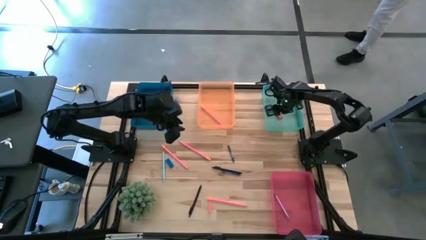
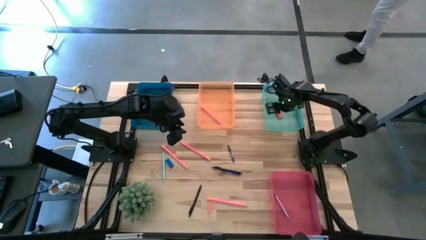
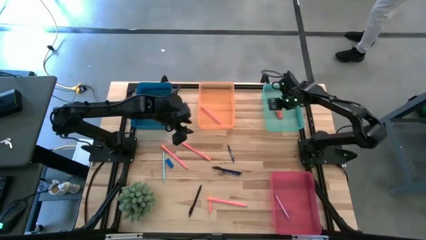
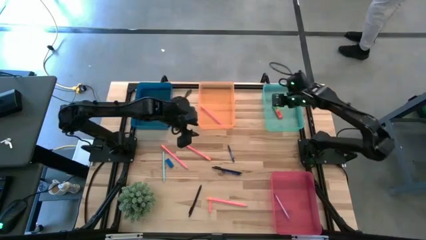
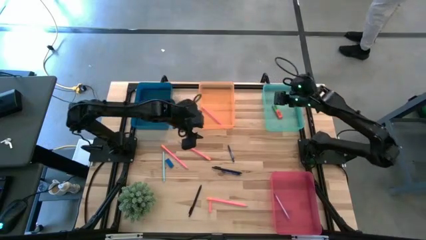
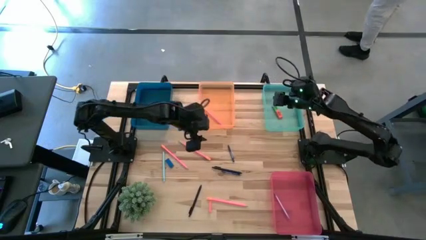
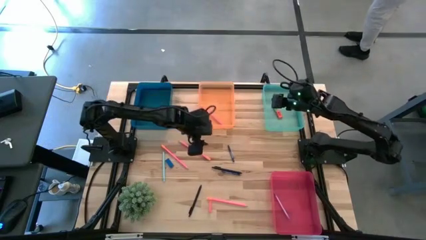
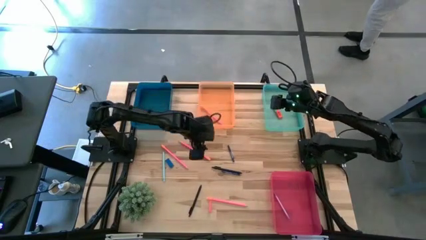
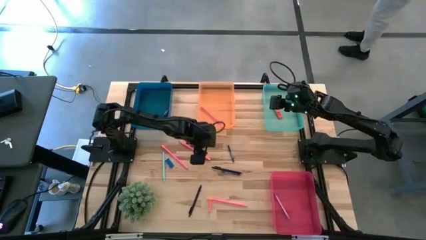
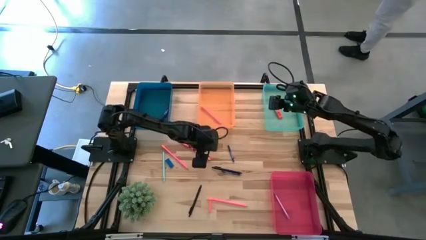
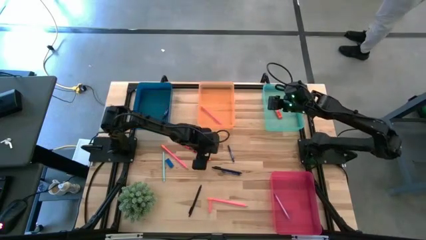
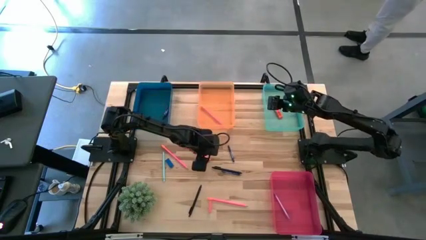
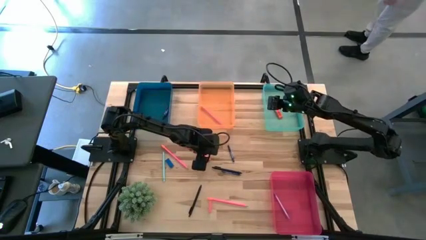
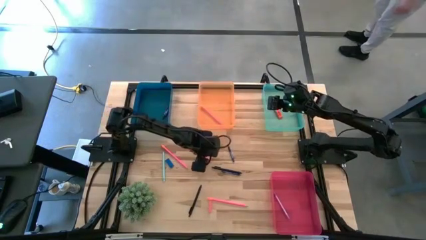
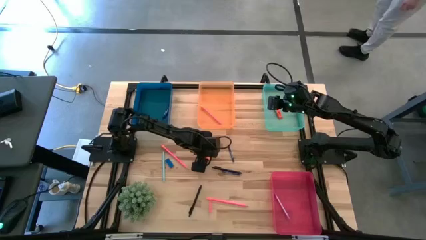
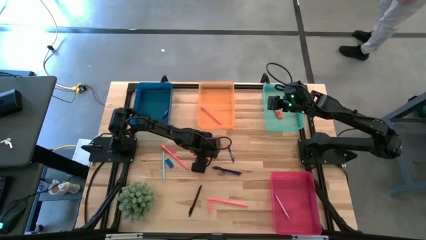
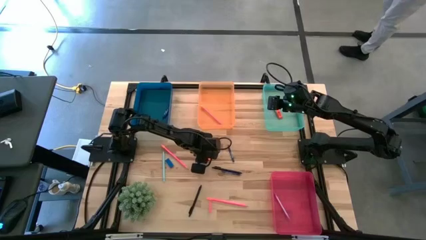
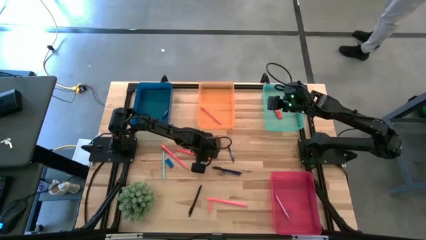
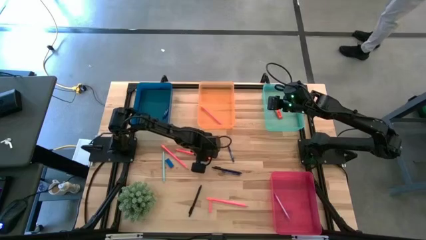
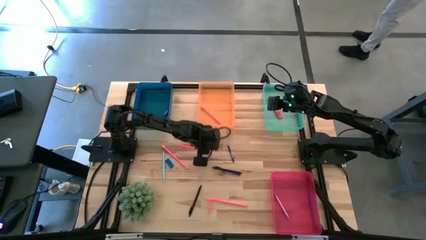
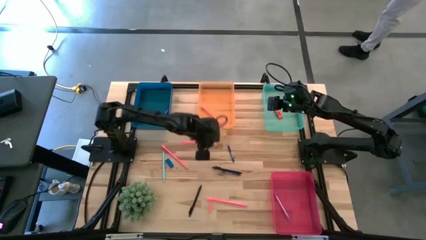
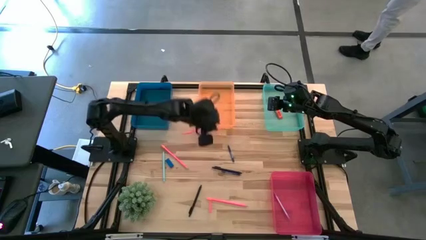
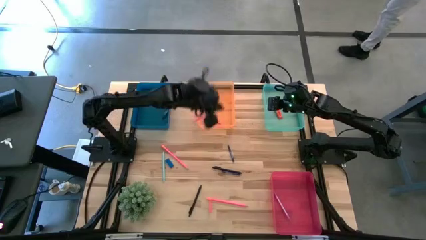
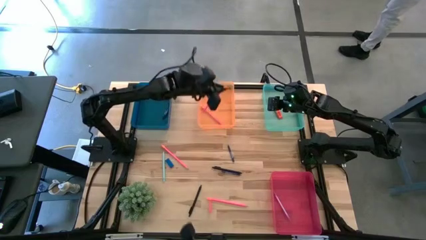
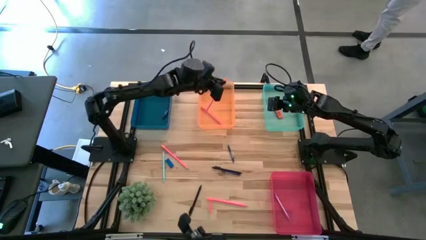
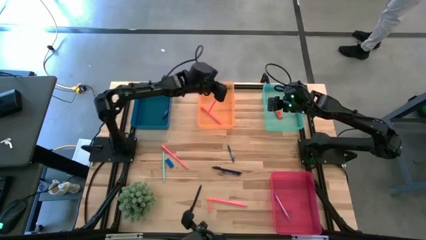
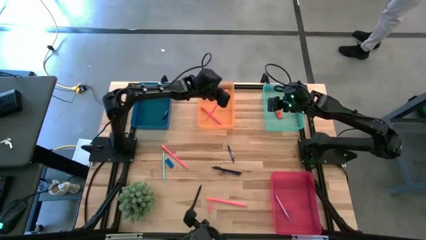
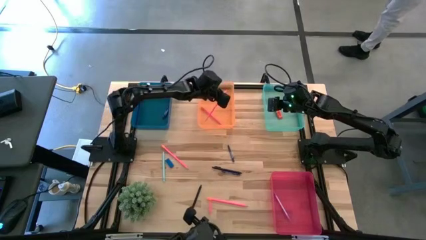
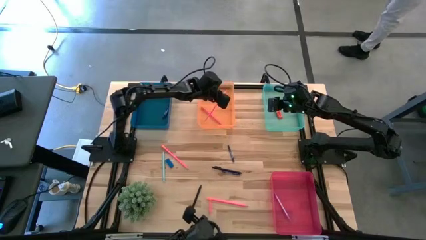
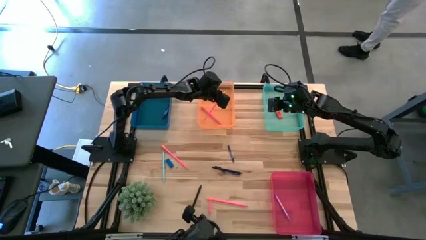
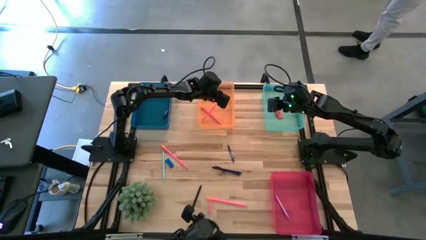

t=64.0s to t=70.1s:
Task: Sort crayons/erasers/pens/pencils in bins
Put the pink pencil into the orange bin

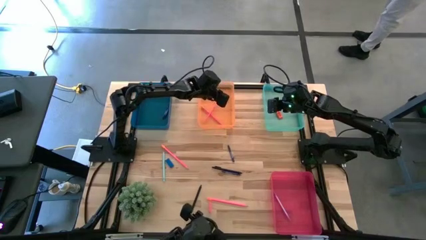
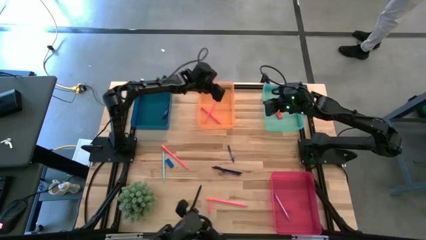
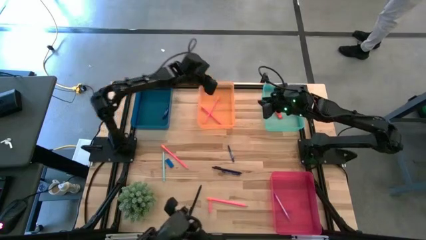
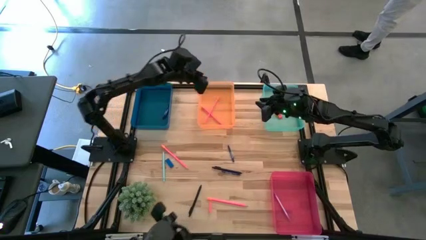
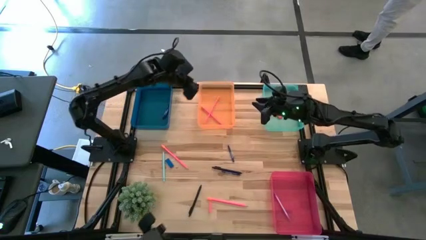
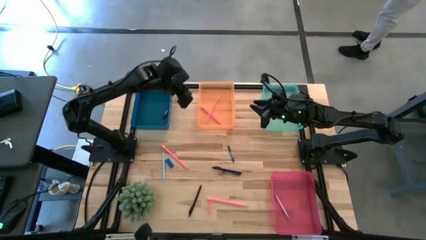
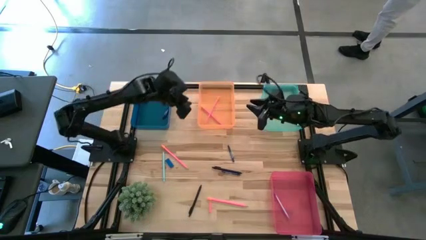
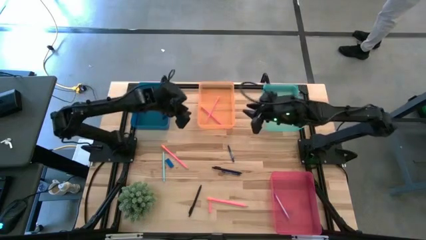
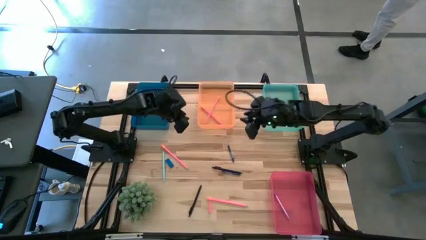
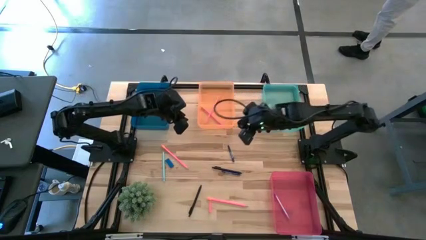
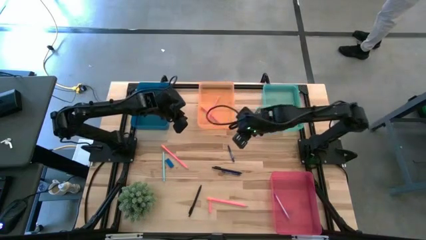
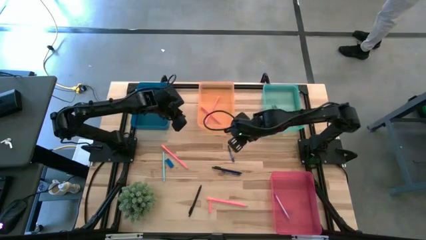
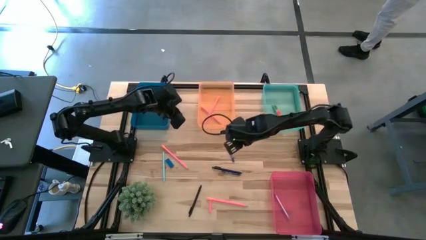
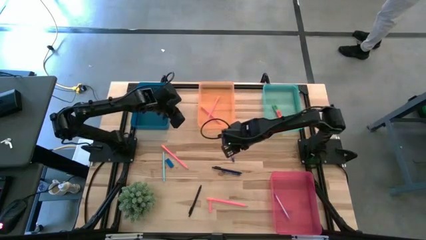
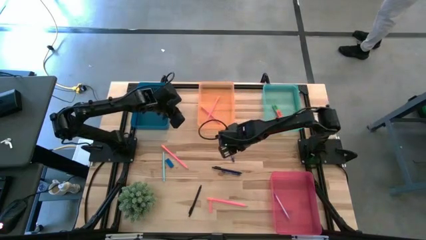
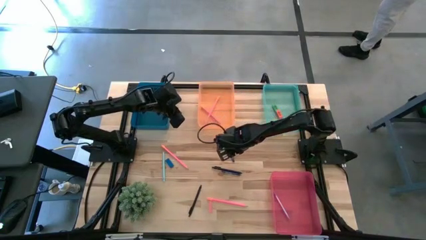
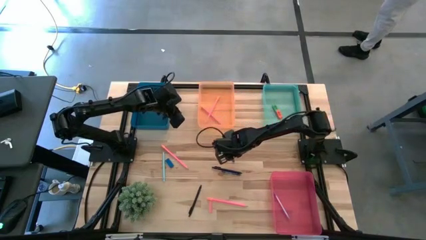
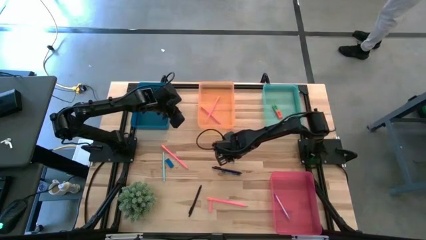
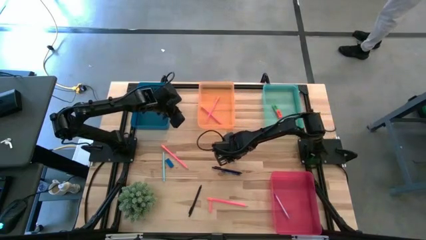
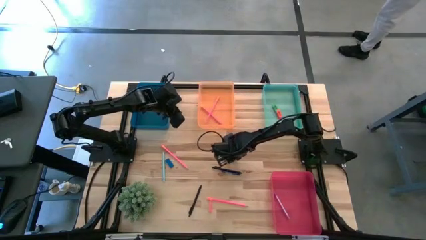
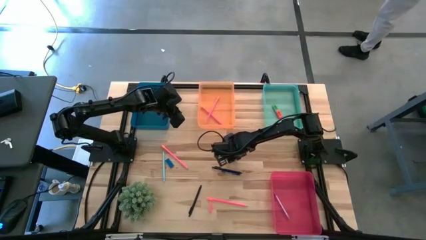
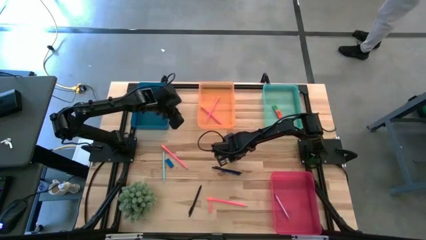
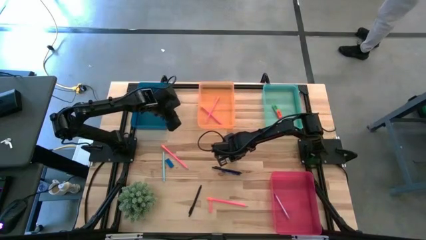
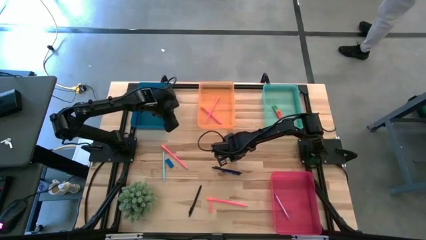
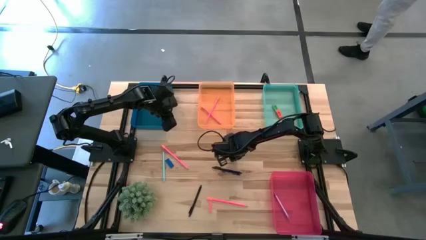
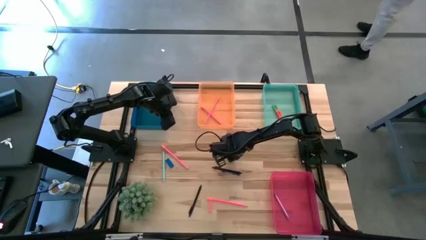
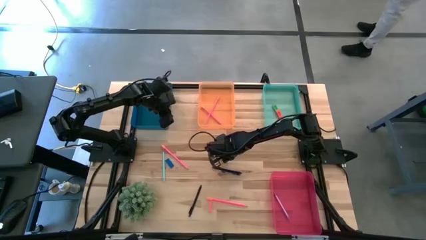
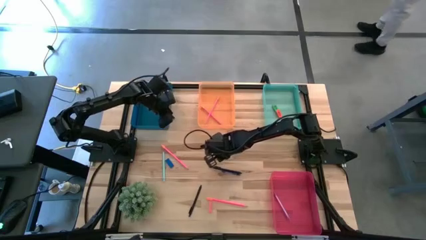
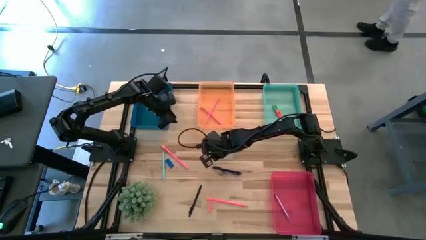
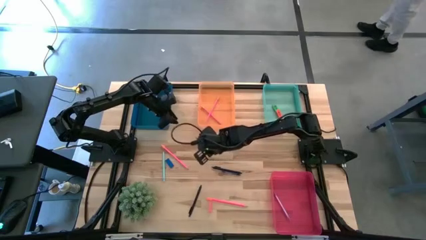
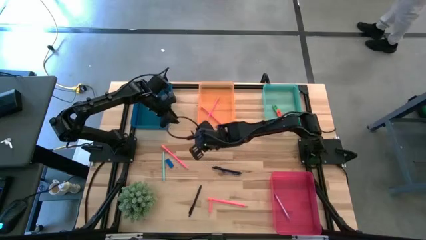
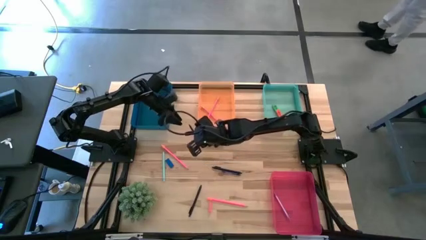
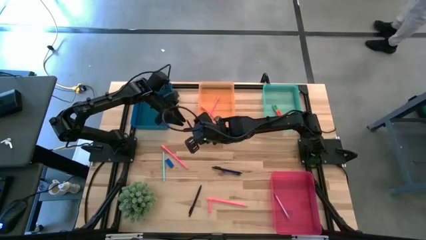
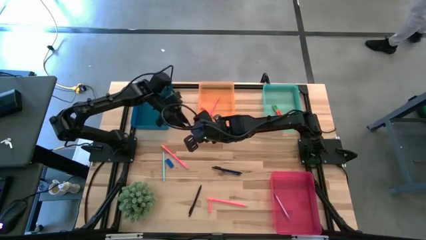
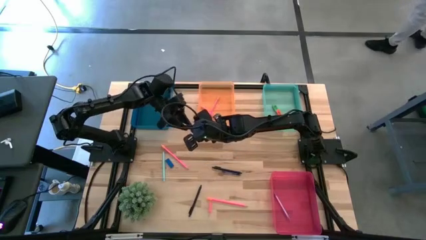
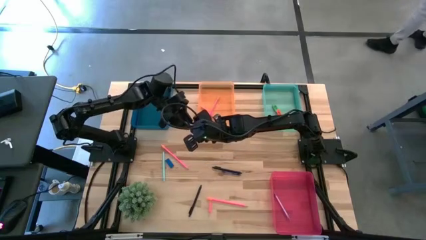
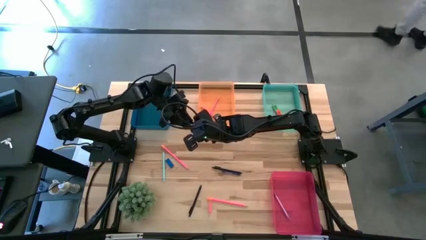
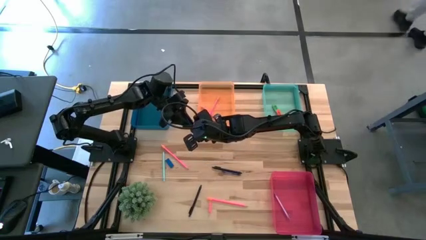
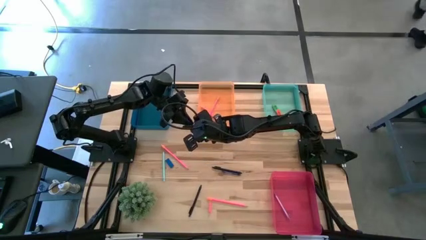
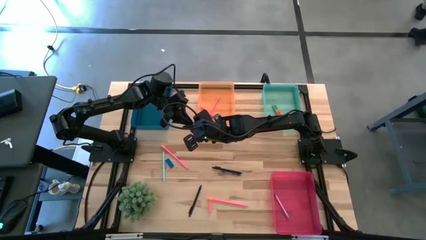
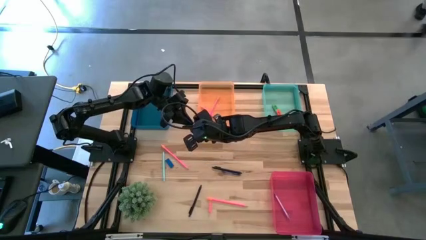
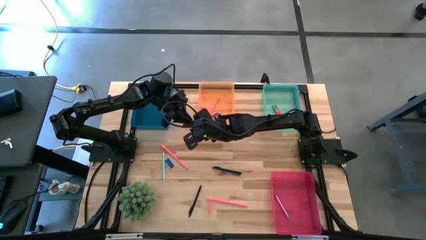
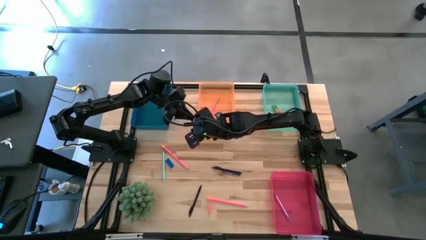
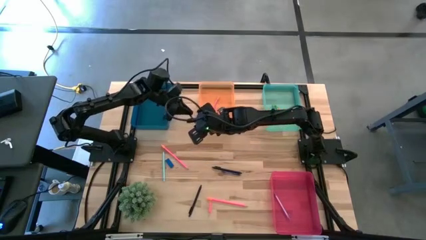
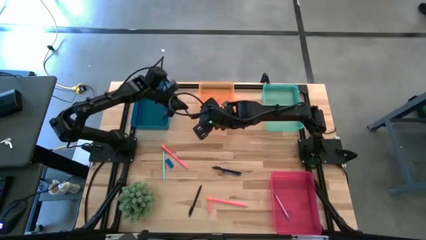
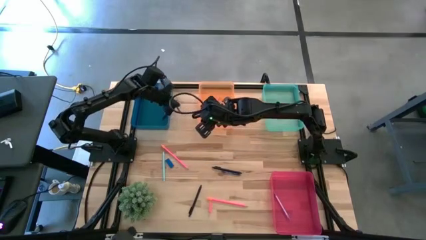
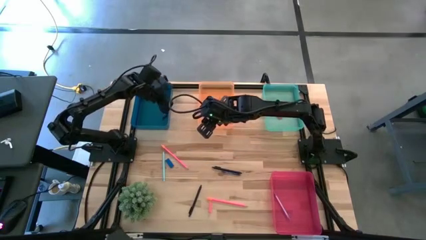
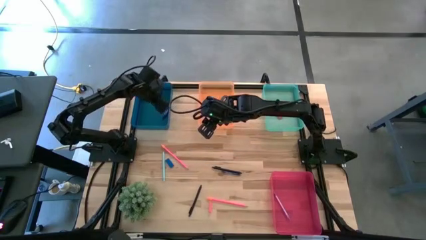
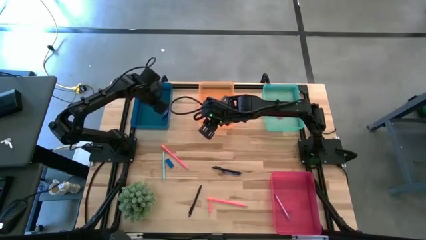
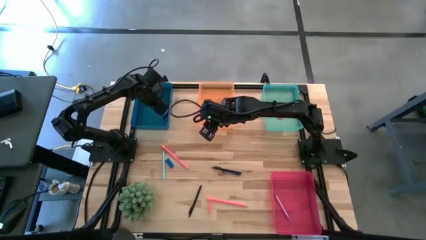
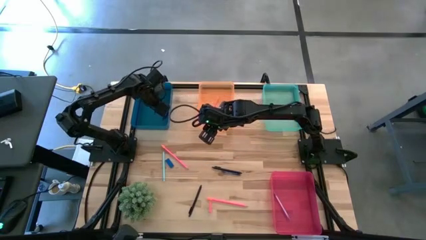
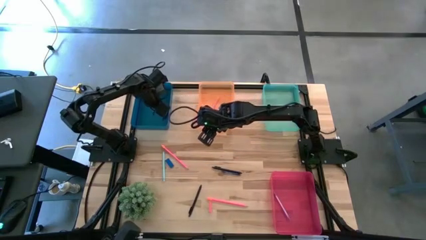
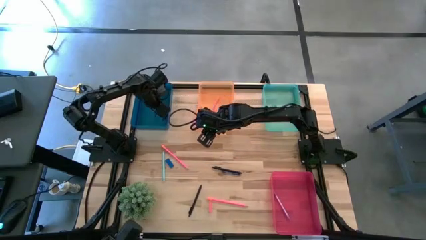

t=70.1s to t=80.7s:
Put the blue crayon into the blue bin
